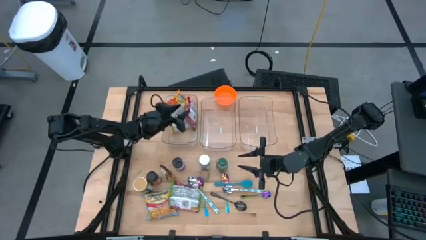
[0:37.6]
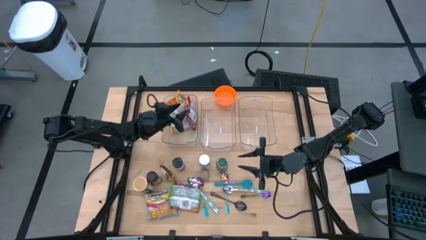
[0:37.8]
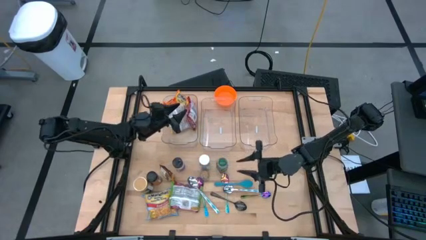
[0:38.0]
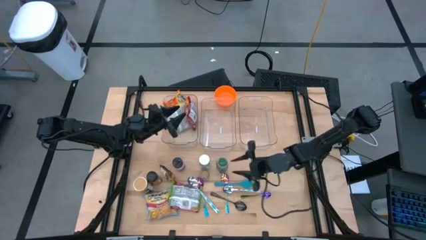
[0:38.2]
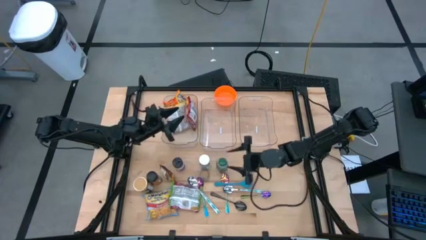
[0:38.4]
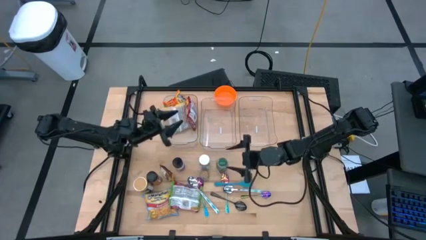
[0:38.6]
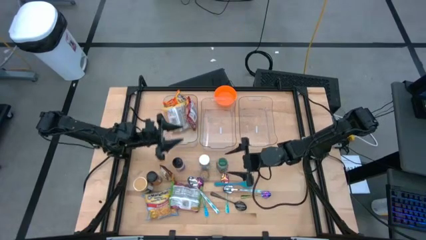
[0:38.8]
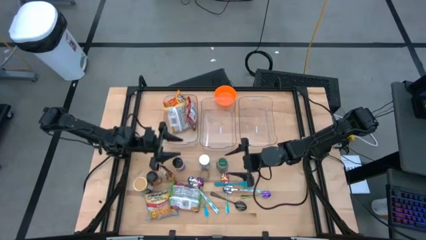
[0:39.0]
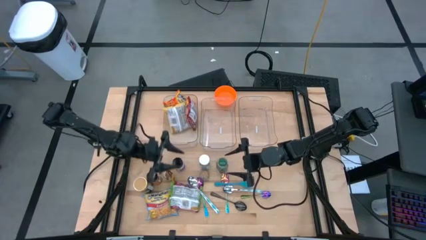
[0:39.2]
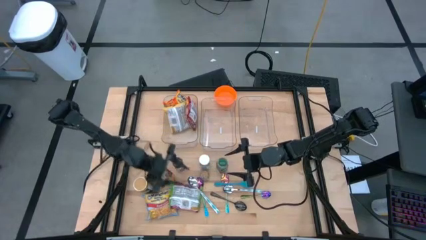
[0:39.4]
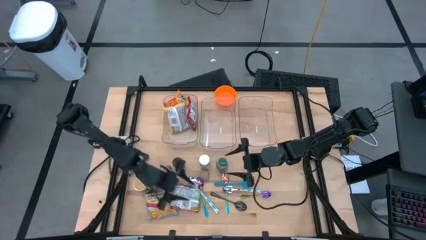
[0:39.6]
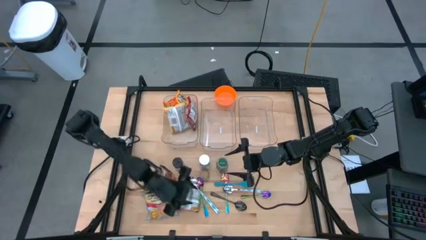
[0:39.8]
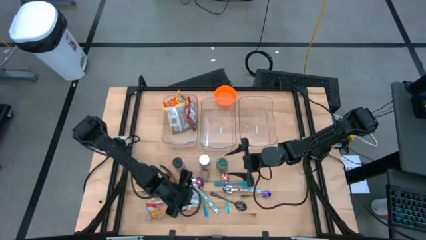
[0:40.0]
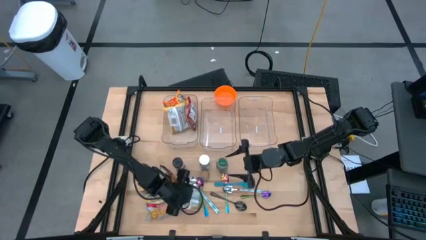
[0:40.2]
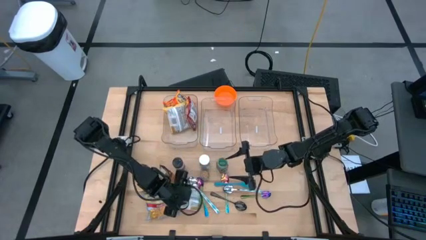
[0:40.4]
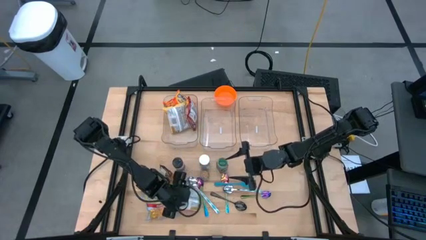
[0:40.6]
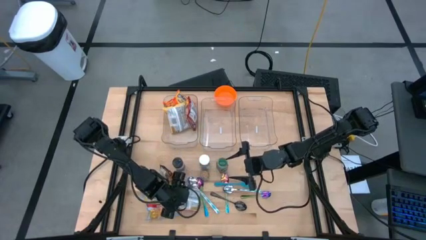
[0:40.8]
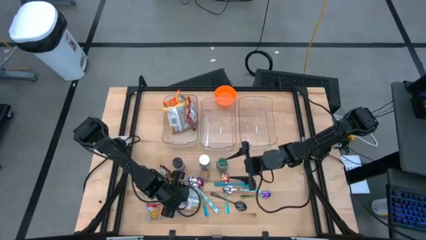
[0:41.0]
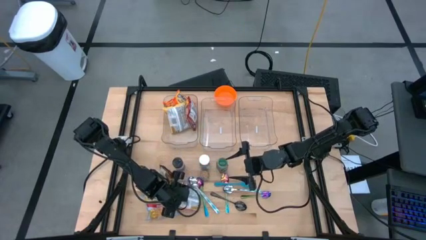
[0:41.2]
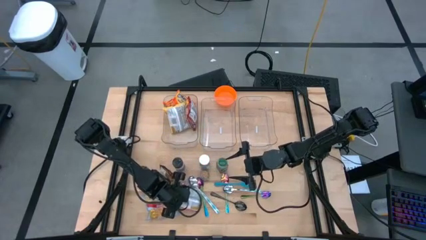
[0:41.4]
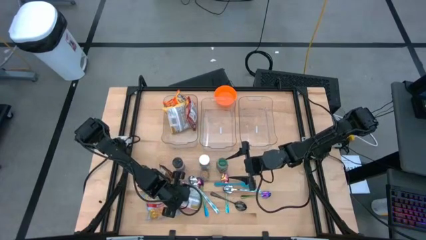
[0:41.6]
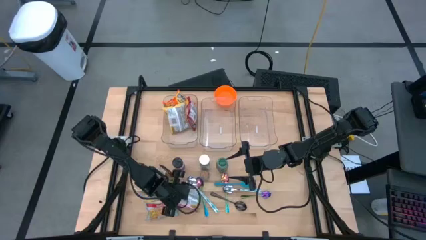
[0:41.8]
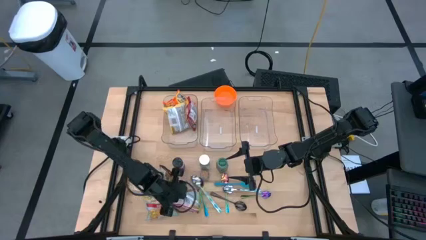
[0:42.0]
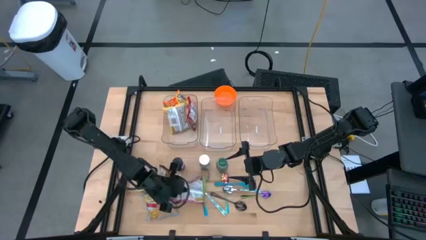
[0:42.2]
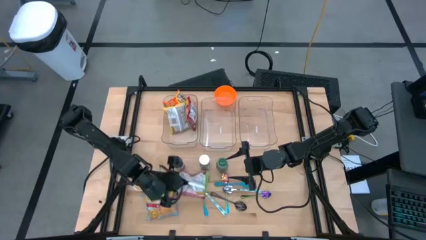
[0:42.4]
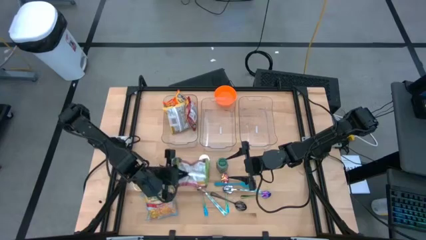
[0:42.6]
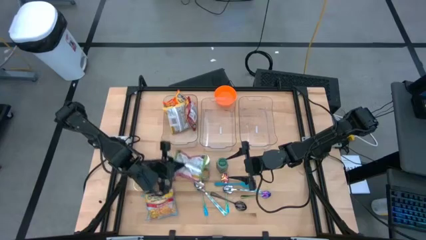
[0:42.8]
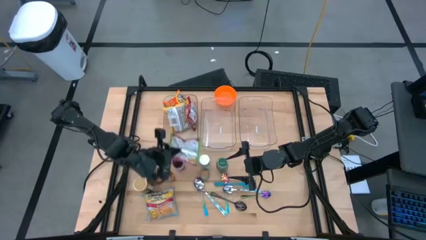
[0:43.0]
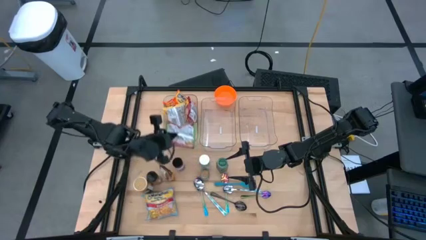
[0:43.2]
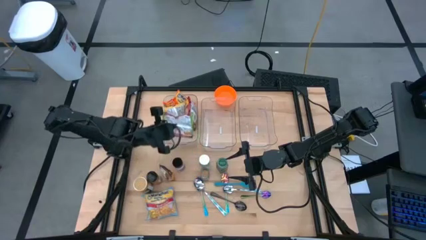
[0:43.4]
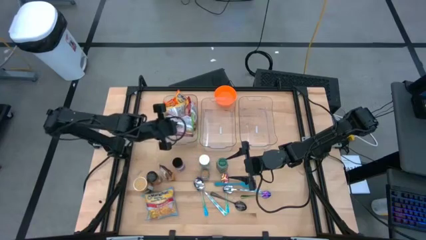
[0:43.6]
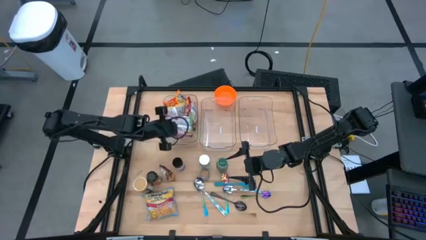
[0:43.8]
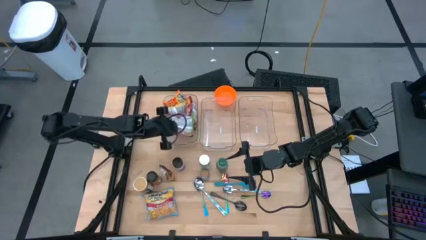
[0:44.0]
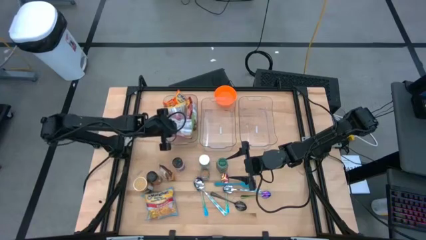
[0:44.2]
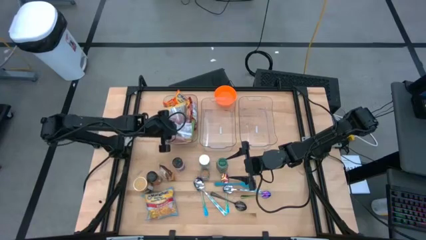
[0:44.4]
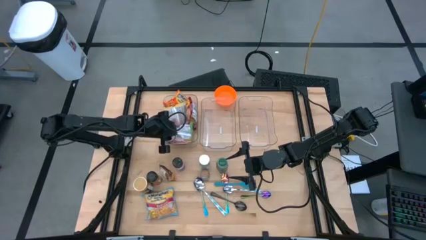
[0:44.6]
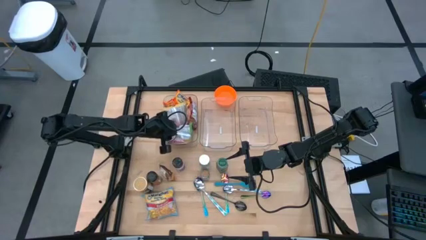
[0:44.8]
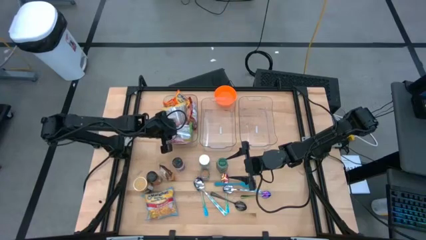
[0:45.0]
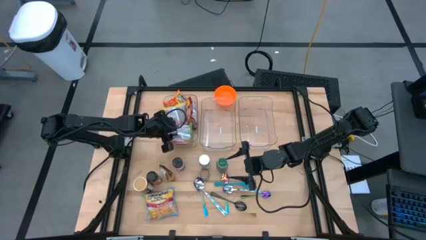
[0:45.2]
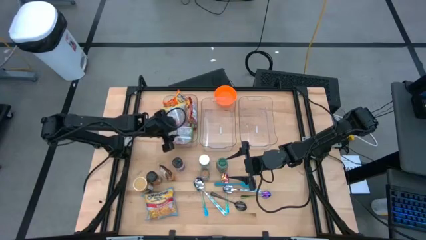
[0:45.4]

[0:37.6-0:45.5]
Task: Pick & Place Food Item
Put the green noodle pack into the left transparent bin

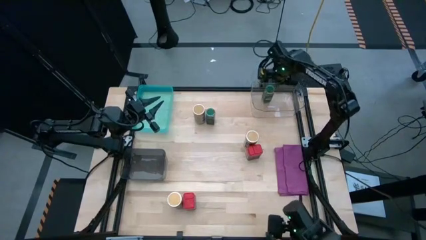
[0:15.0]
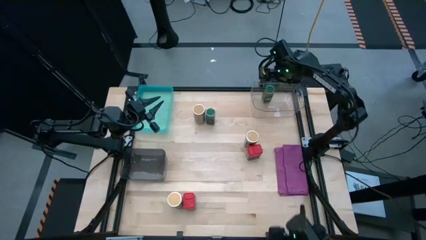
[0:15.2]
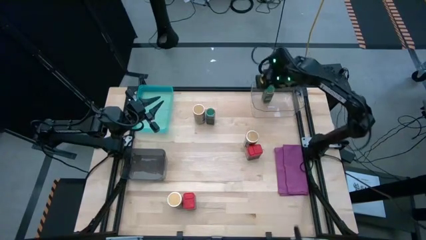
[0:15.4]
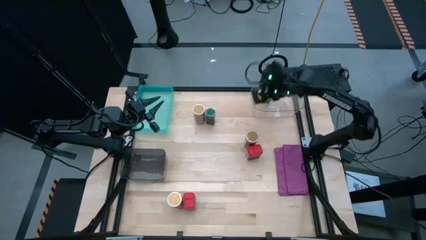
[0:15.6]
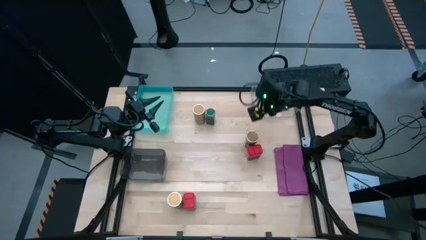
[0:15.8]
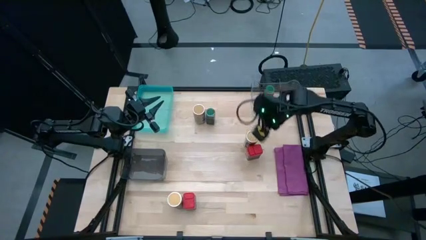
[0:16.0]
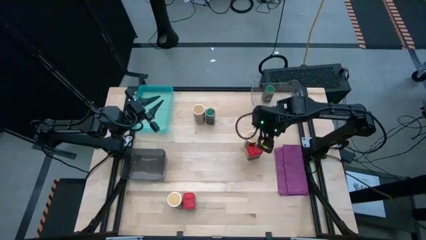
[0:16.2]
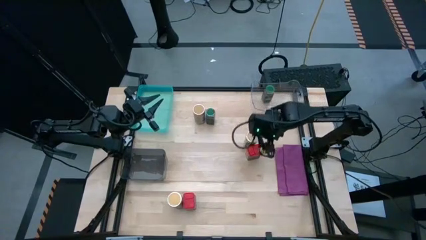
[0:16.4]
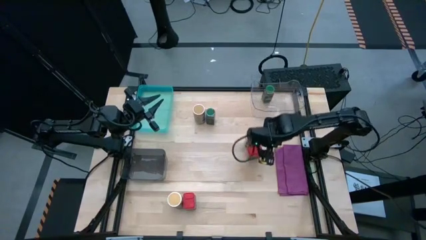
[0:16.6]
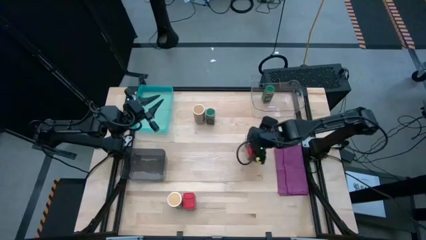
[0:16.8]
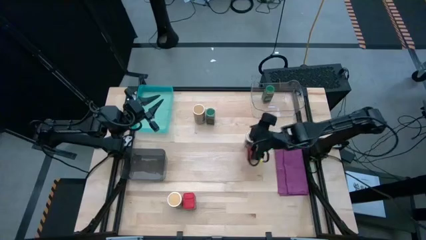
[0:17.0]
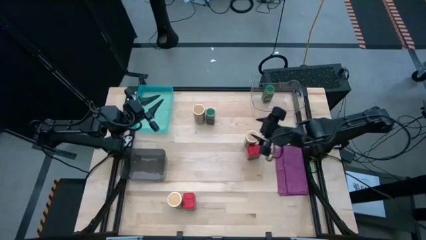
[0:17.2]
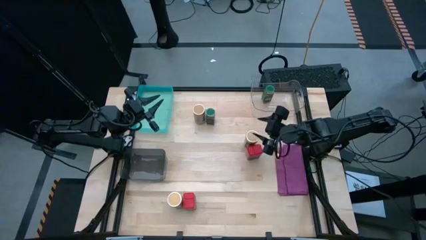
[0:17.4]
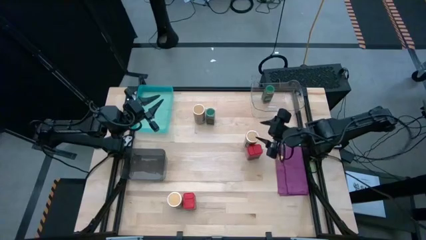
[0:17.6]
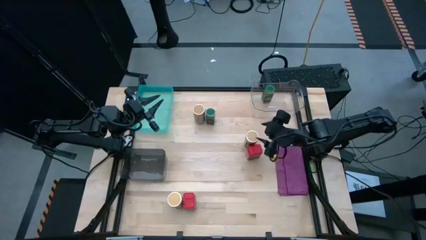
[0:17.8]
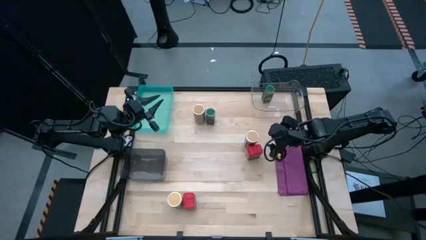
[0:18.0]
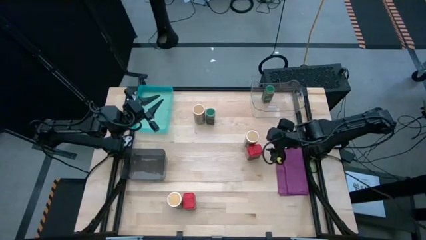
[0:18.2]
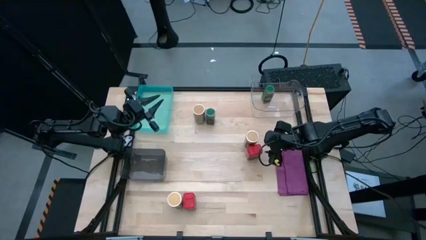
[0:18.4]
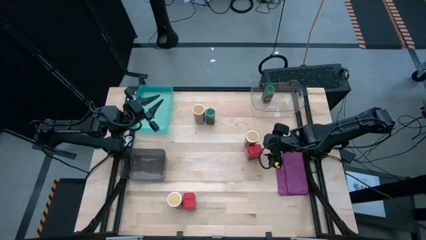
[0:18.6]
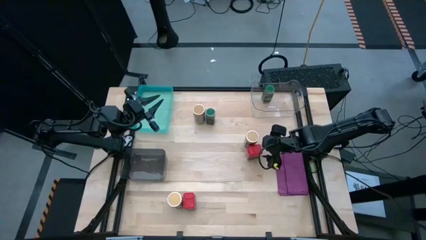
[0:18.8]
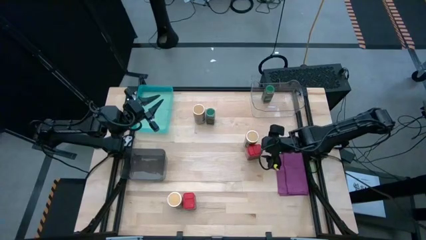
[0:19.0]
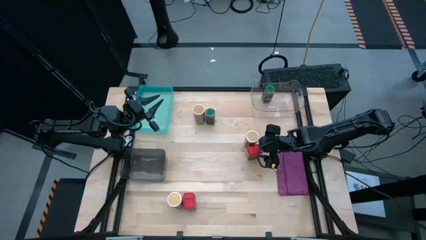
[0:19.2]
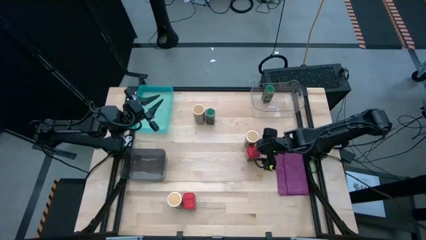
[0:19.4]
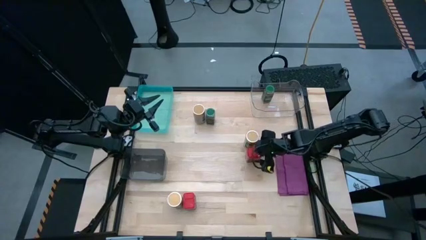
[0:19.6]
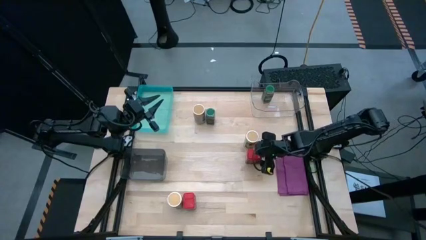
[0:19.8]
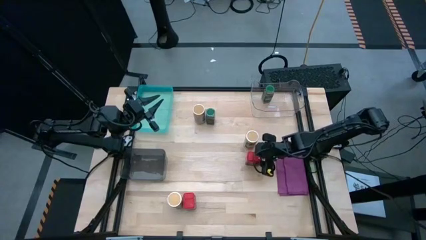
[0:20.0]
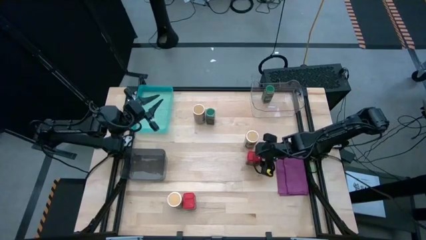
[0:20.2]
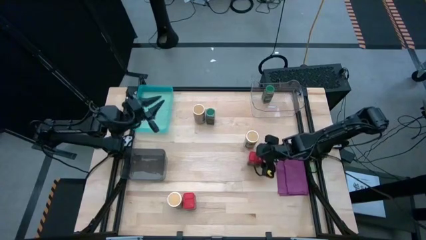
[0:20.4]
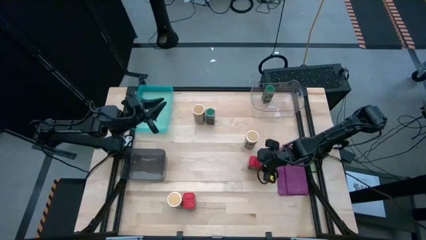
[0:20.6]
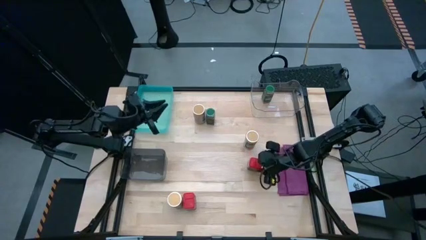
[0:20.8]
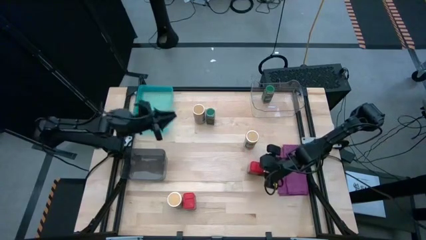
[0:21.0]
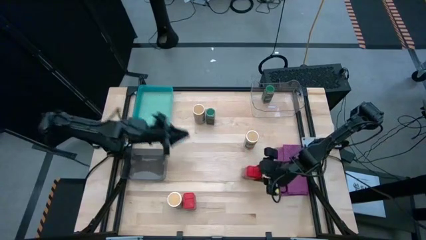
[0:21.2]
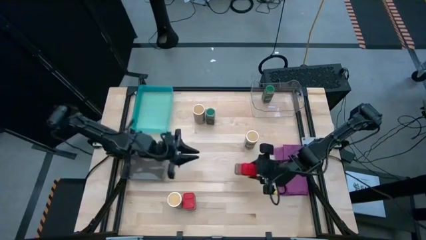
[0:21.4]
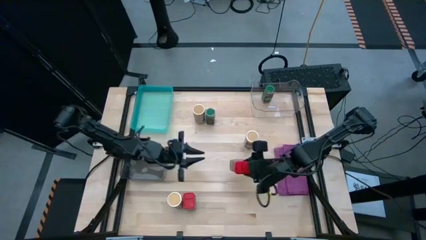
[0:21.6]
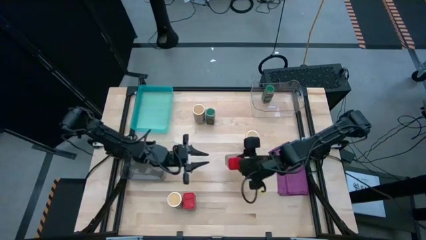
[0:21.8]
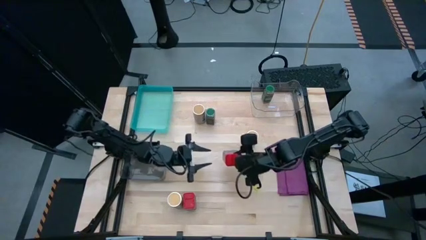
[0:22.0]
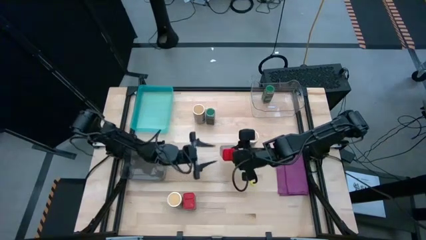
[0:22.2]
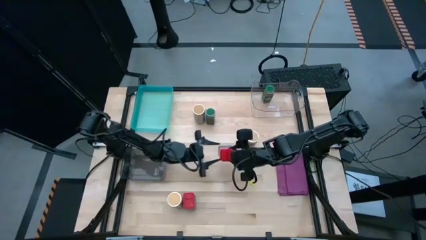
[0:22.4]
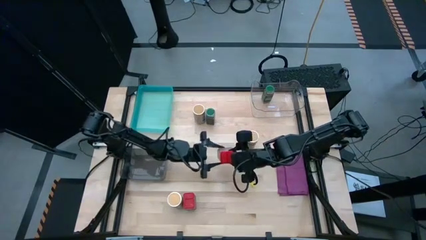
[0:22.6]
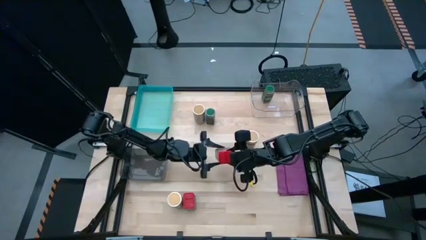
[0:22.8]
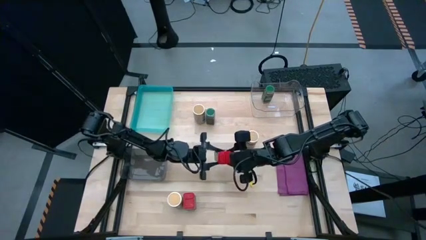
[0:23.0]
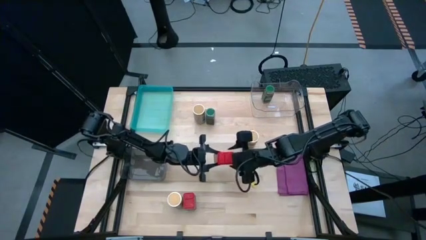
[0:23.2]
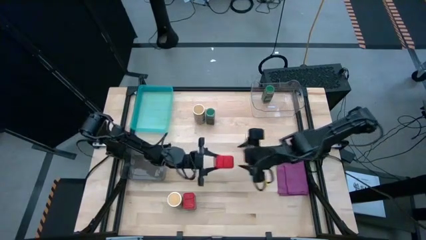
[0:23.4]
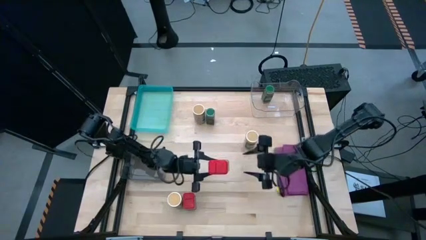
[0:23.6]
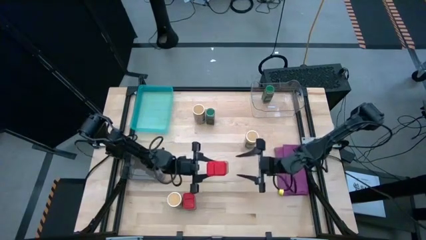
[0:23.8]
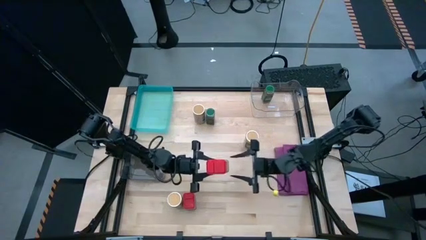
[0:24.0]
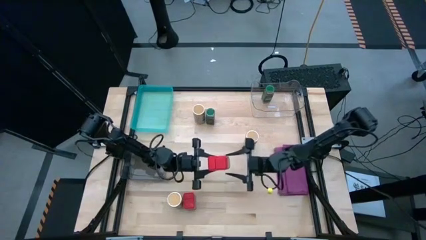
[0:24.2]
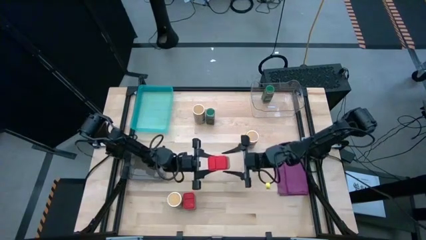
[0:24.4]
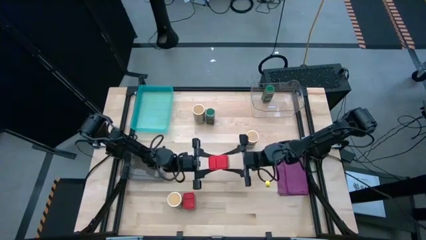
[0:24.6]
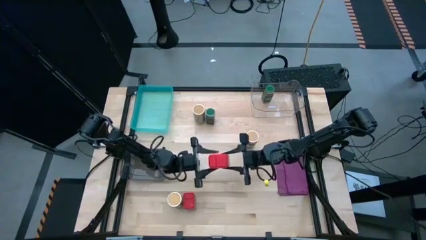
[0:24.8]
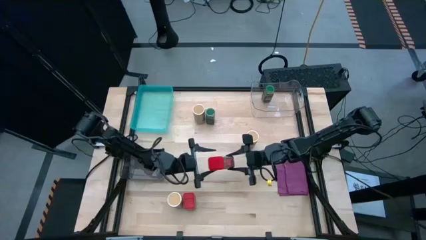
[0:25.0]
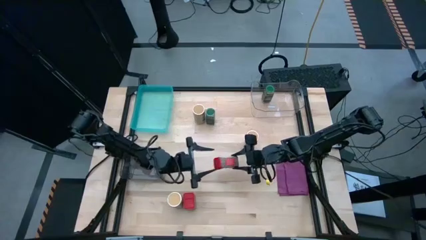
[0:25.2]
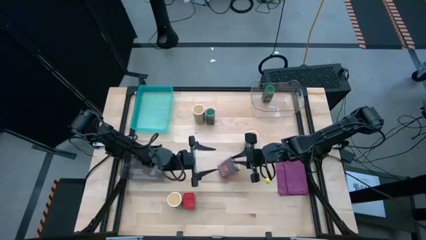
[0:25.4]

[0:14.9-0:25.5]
Task: Sort spices by type
Put the top red seasoning can into the blue bin
